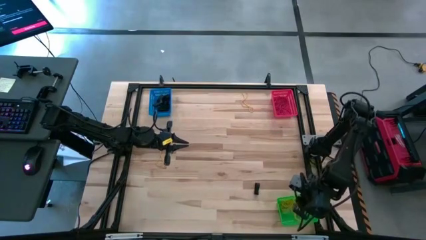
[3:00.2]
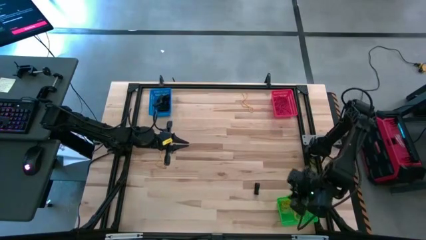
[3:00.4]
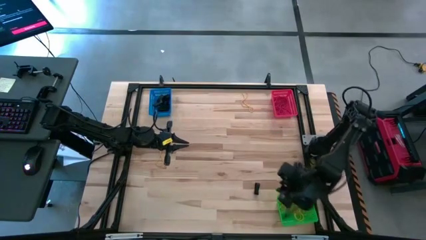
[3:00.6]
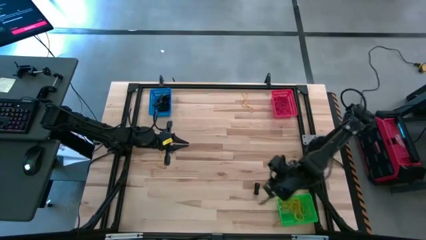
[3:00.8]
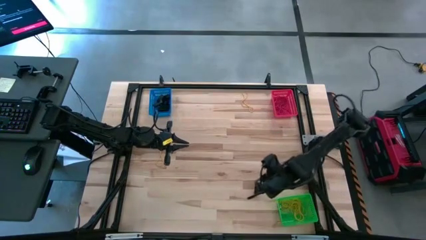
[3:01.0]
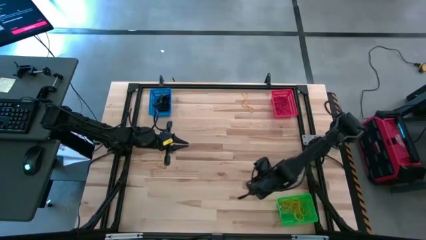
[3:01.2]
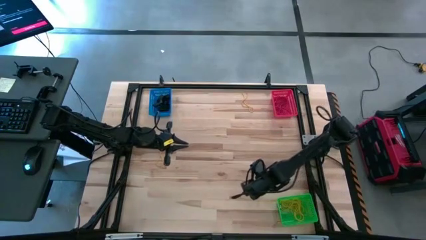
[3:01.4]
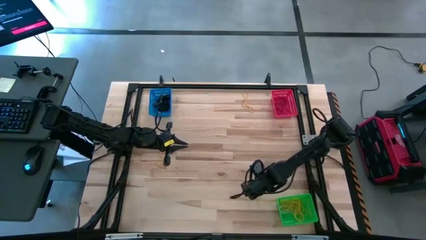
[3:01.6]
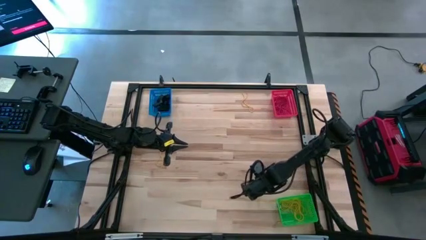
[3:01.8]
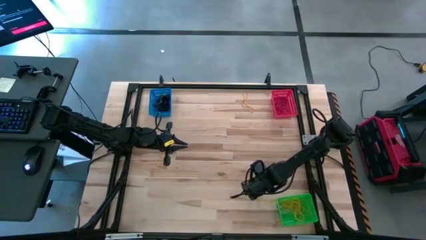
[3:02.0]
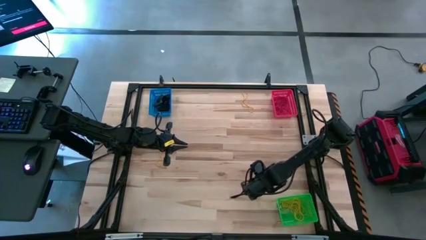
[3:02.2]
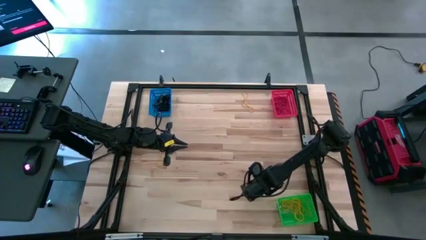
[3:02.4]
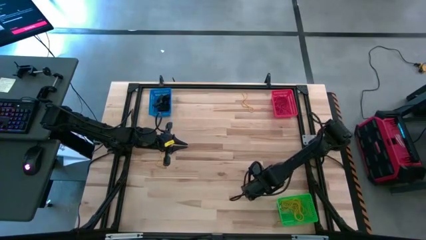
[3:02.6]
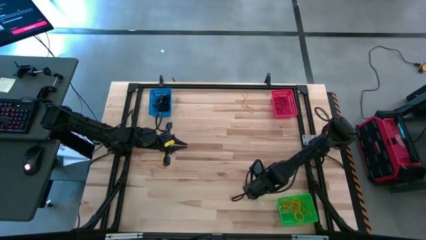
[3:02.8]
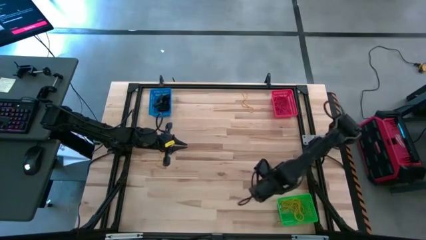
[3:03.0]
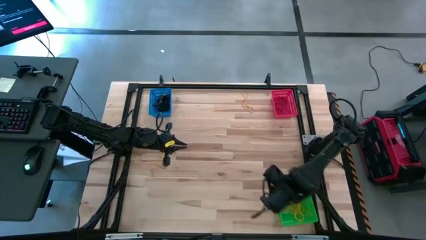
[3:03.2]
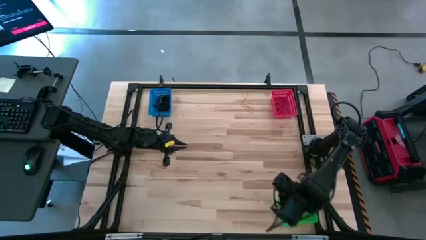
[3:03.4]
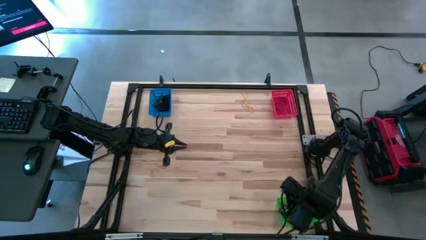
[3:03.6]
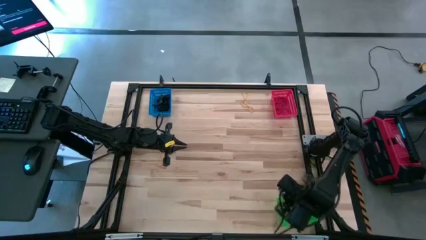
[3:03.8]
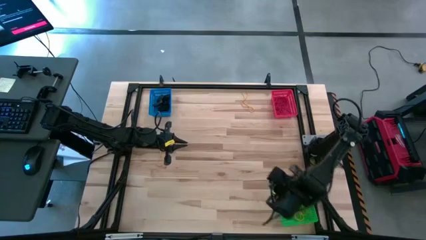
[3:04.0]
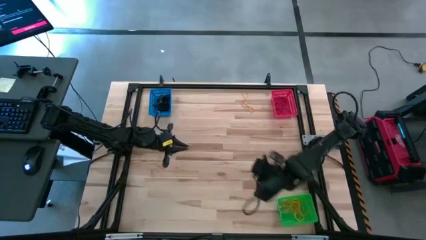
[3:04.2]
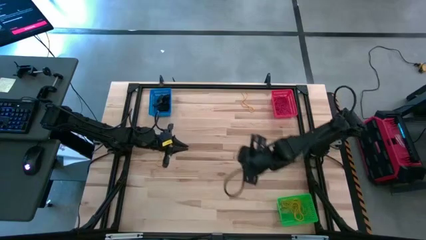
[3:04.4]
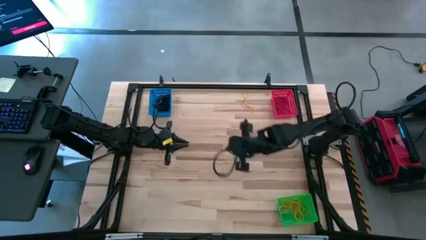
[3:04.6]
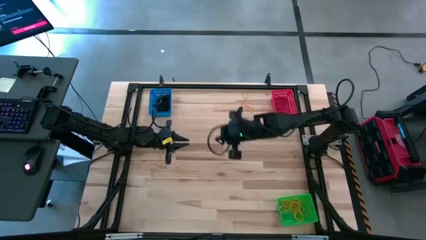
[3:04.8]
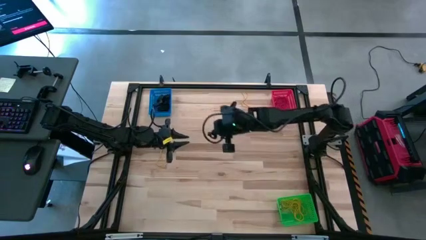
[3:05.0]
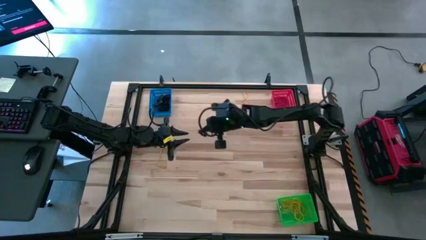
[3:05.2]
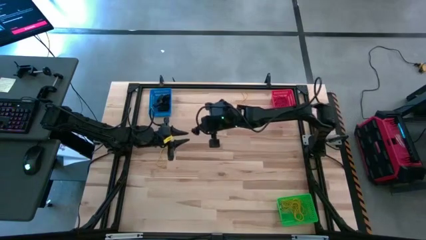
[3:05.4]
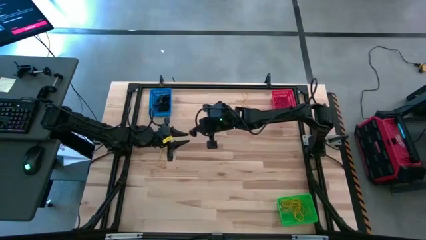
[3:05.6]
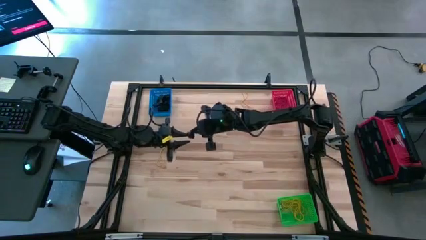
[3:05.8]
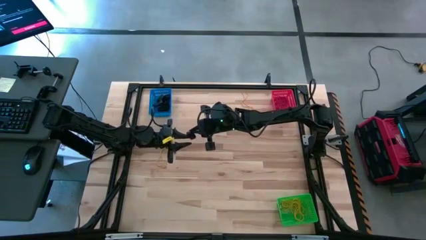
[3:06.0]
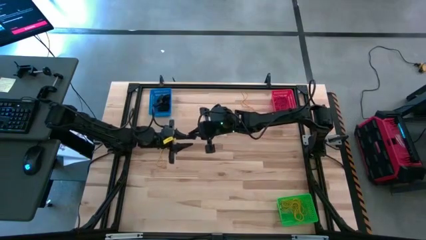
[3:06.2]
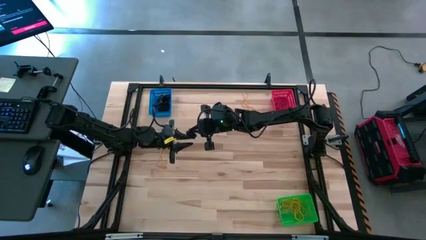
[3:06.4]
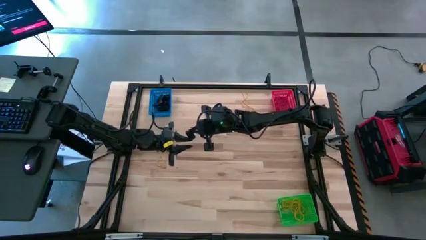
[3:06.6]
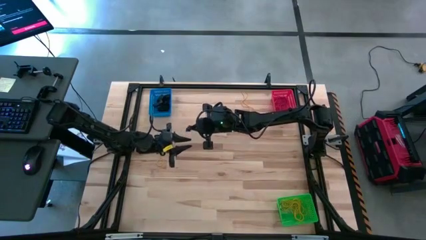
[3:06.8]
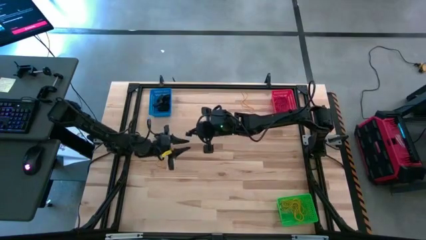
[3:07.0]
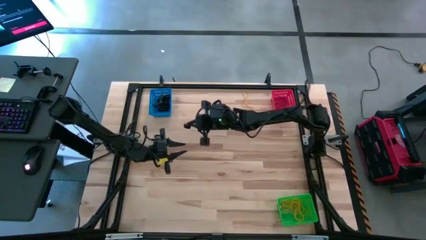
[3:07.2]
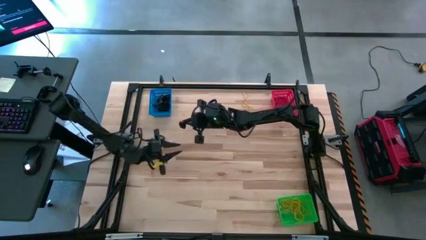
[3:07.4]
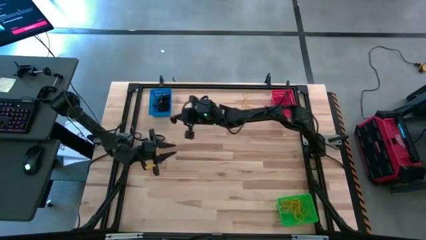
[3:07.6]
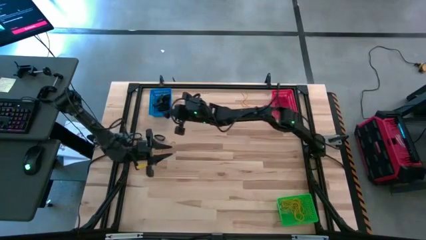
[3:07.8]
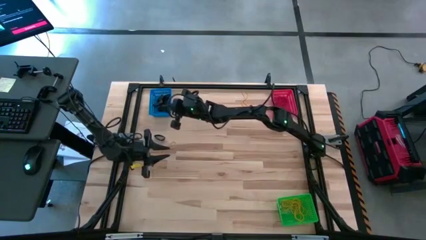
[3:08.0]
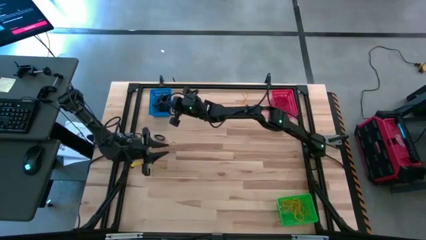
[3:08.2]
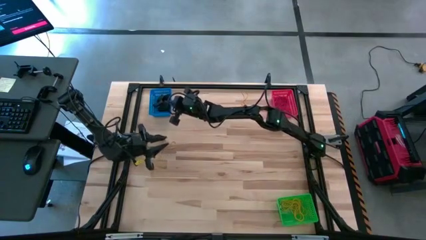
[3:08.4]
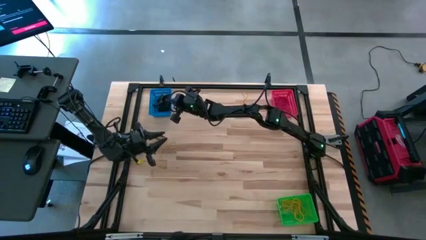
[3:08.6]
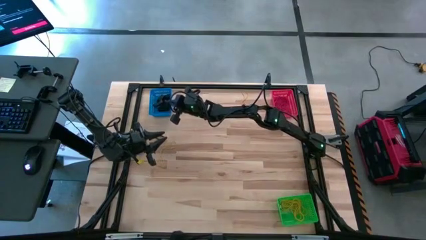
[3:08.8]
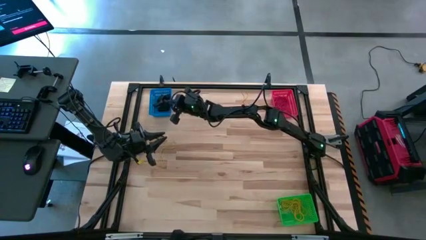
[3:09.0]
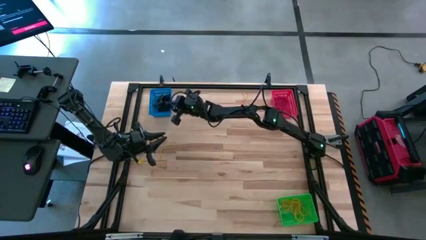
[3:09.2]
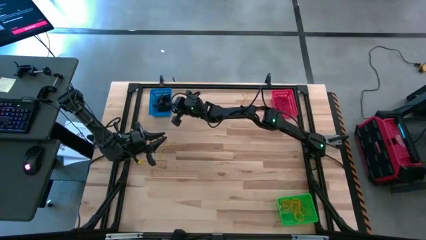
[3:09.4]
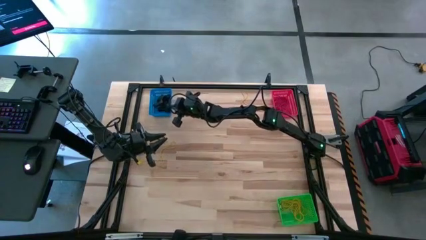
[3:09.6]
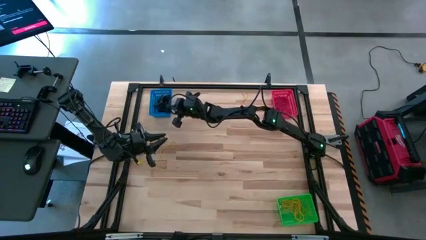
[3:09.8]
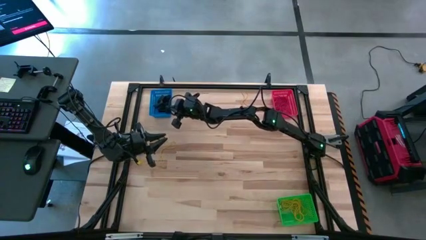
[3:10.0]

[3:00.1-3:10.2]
Task: Sort rubber bands into baskets
Put the black rubber band into the blue bin

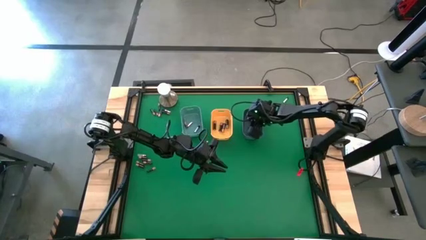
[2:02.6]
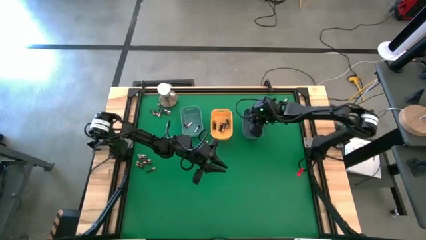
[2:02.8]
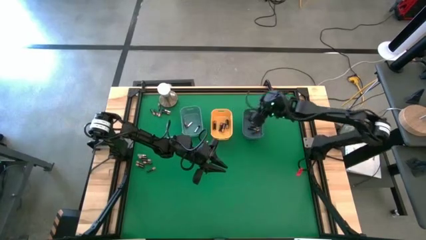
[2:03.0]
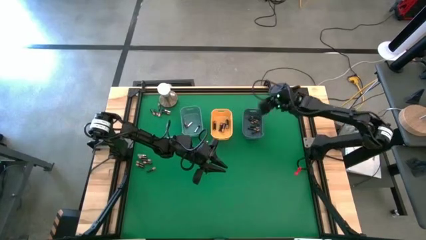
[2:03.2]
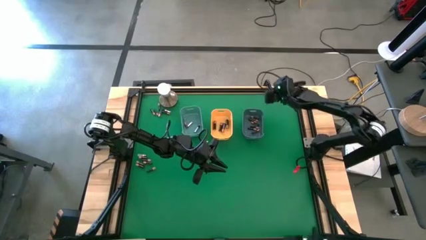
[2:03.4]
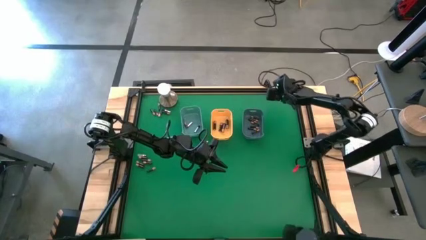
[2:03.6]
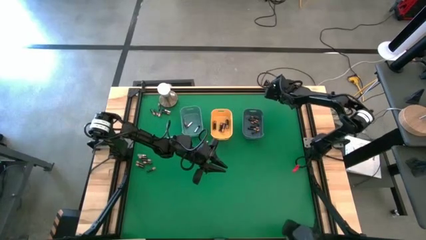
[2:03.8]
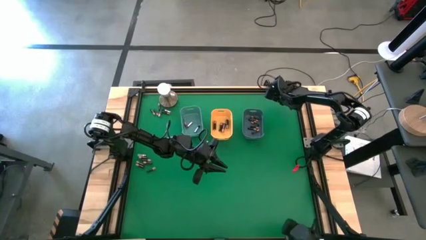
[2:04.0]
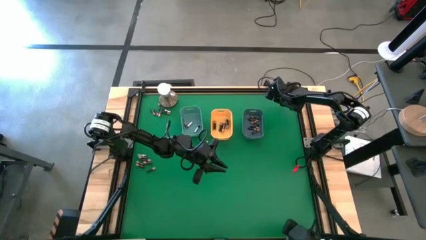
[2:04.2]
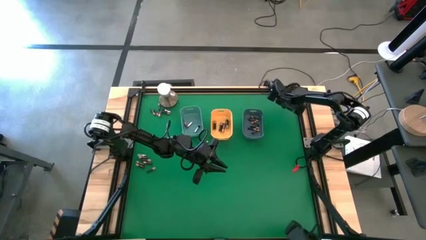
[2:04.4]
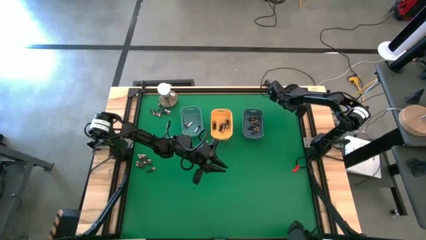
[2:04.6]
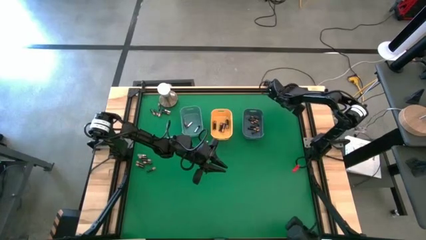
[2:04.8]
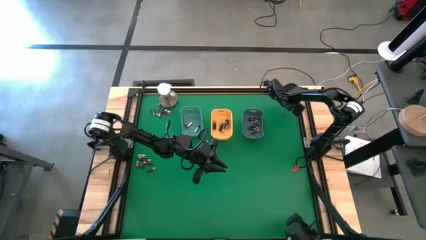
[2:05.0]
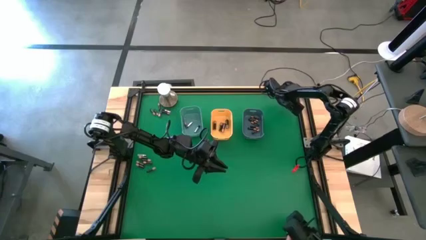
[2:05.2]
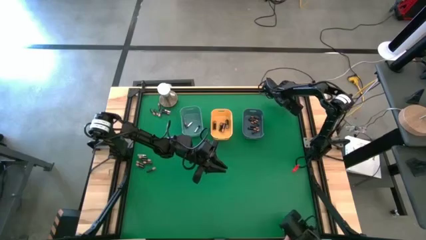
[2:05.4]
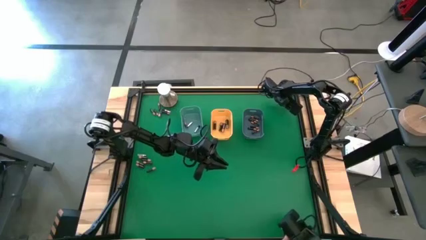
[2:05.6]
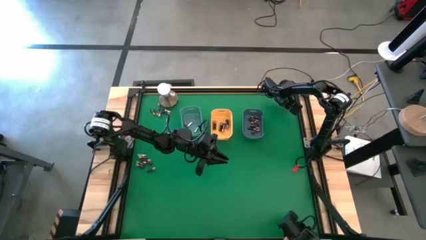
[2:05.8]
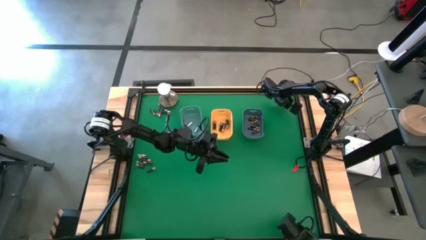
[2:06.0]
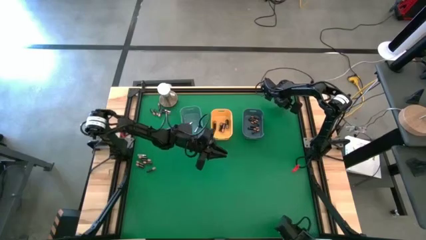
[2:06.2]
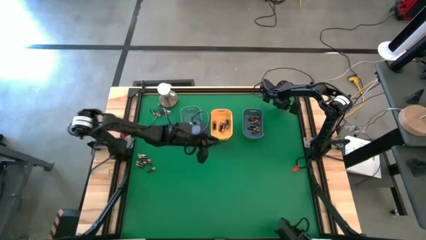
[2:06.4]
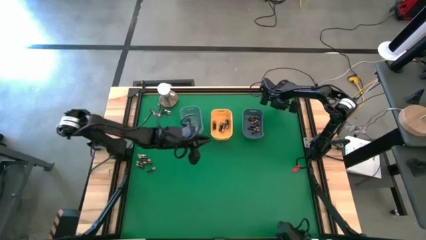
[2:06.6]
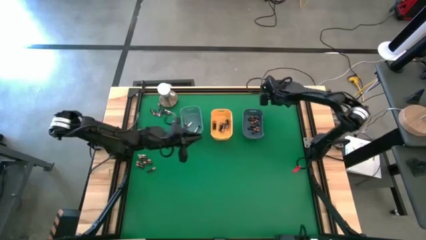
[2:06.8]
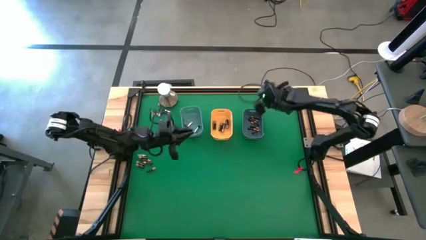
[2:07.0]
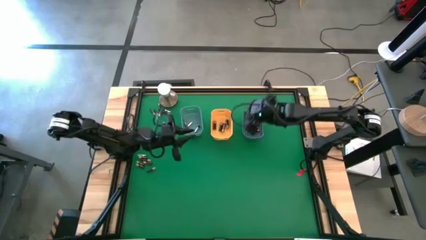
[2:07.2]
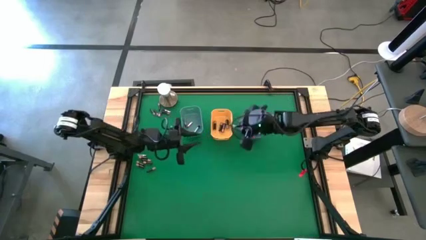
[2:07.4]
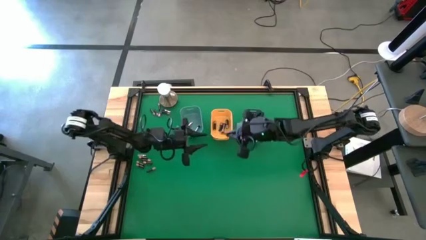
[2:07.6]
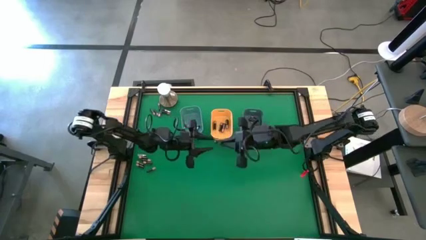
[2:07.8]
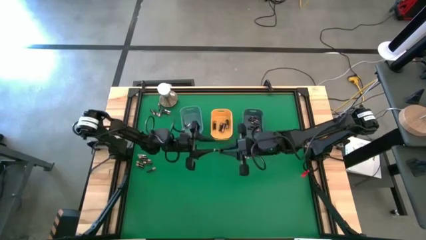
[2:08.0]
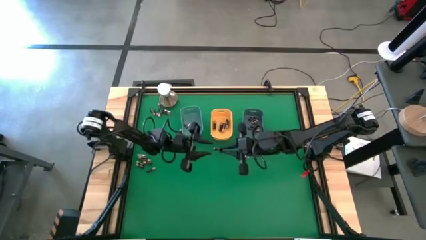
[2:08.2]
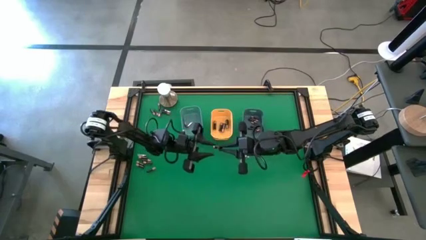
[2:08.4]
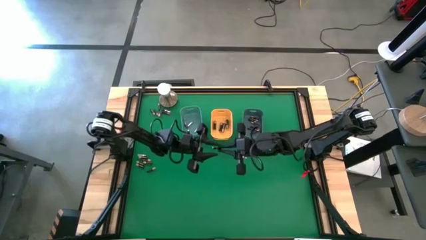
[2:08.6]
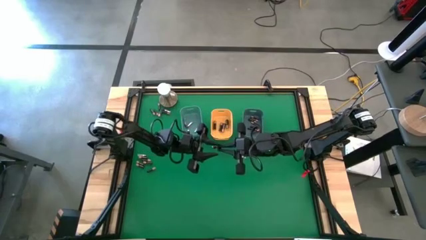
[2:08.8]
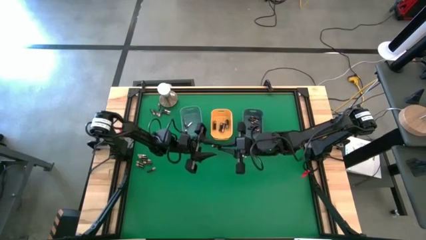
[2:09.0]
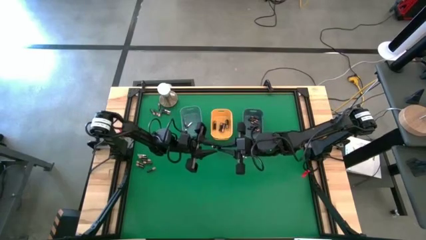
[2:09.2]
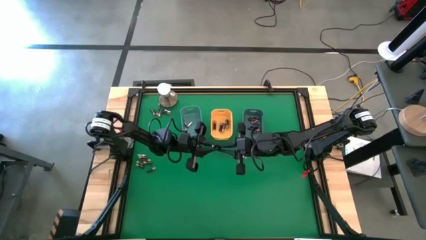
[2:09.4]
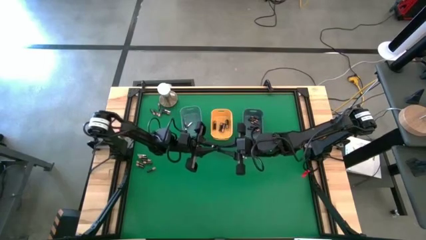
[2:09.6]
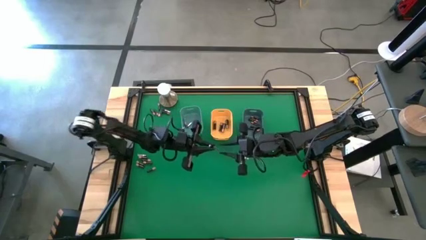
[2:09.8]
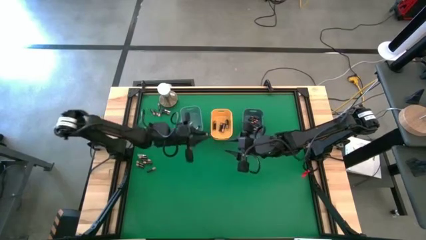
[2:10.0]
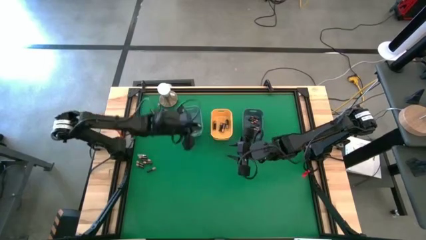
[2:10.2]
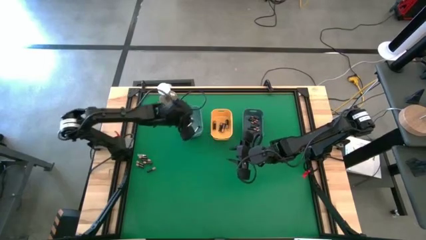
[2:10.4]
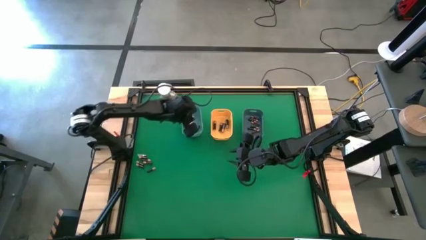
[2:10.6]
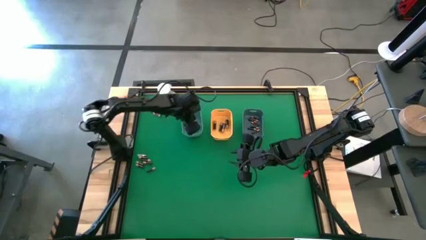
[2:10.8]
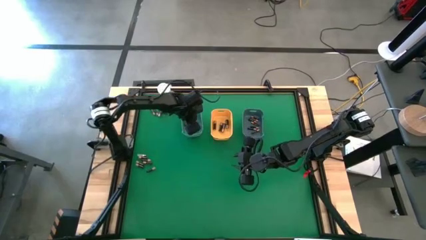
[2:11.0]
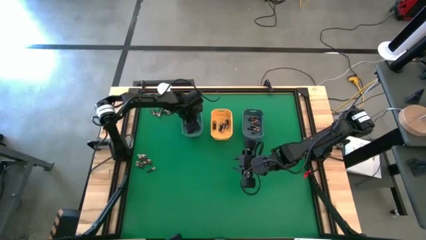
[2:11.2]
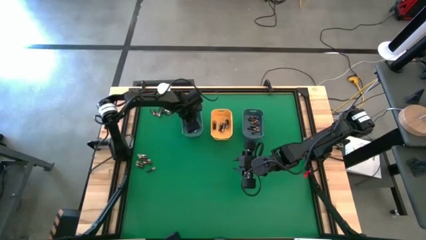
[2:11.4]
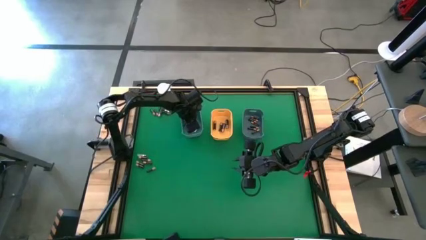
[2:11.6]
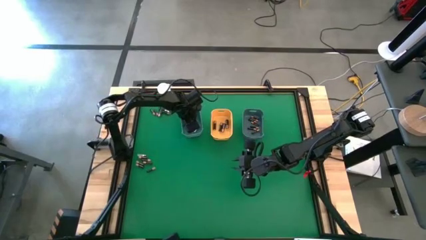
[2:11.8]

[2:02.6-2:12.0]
Task: Sort batteries
Put the silver battery into the green bin
